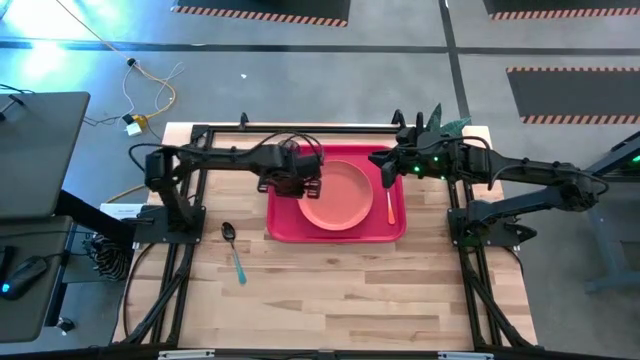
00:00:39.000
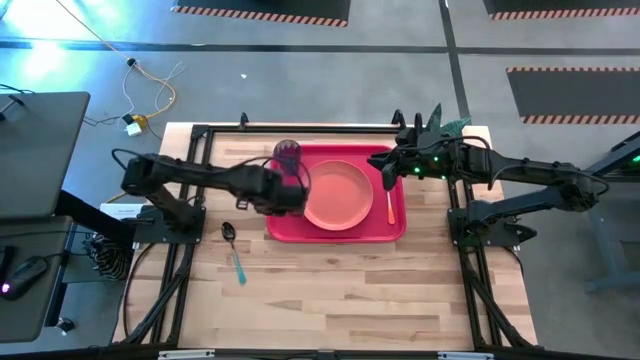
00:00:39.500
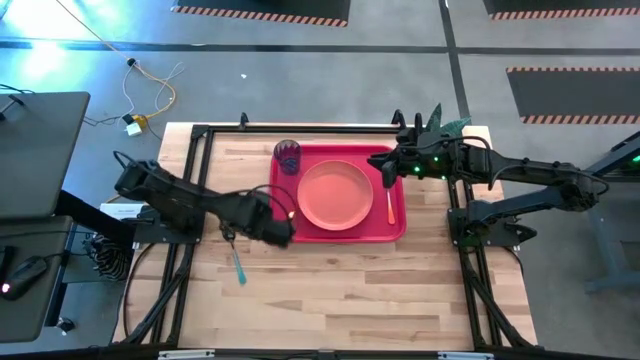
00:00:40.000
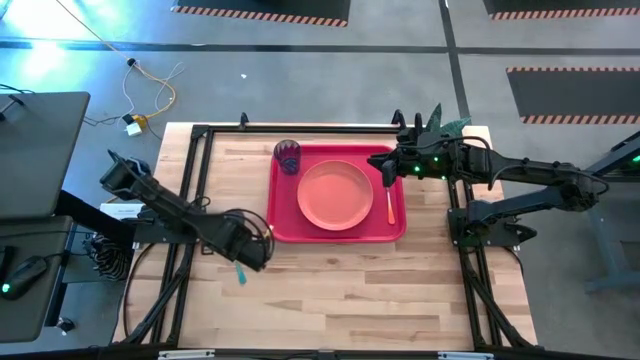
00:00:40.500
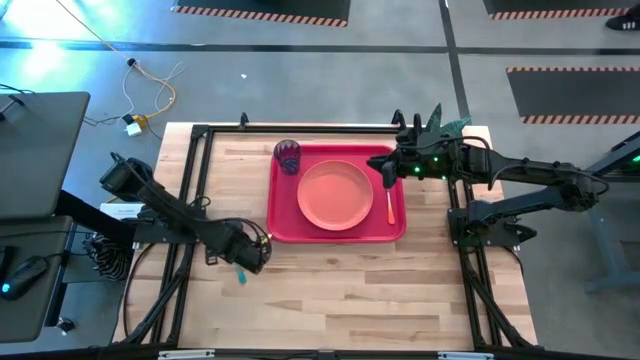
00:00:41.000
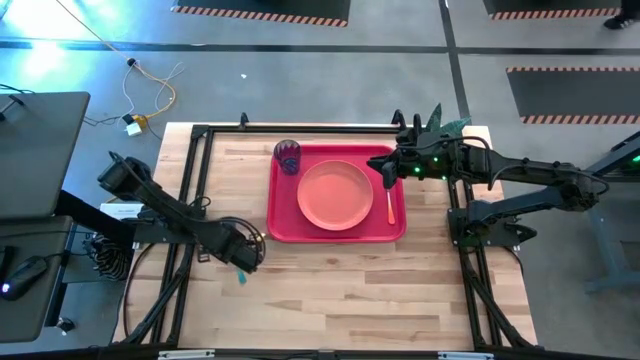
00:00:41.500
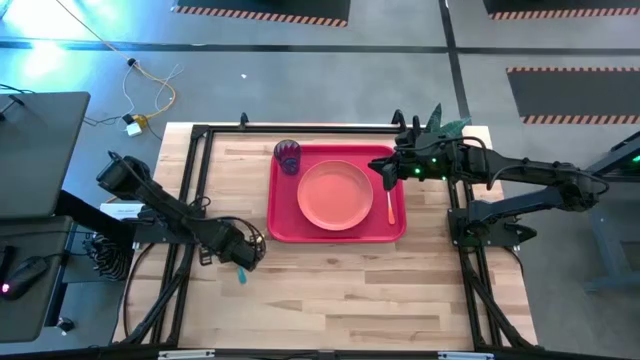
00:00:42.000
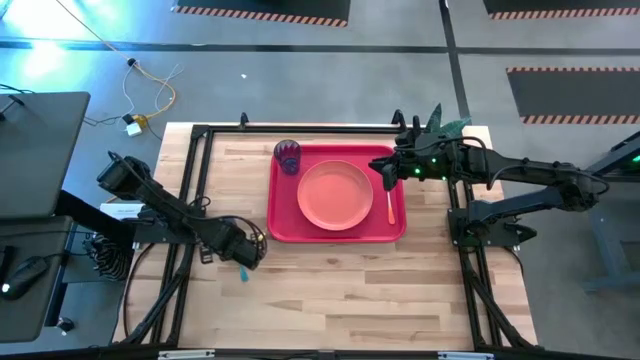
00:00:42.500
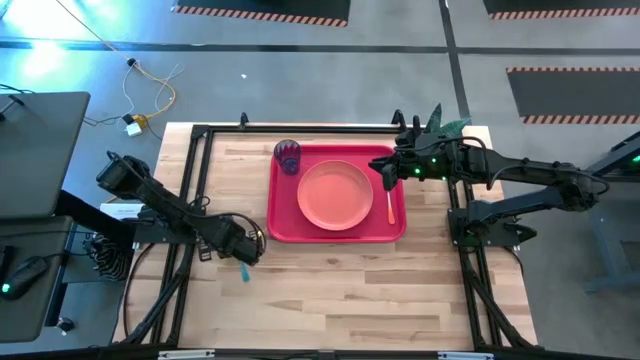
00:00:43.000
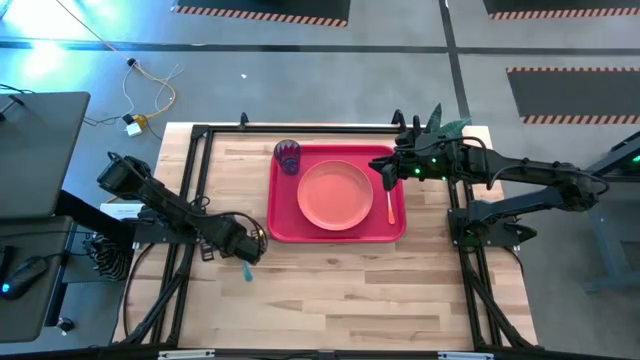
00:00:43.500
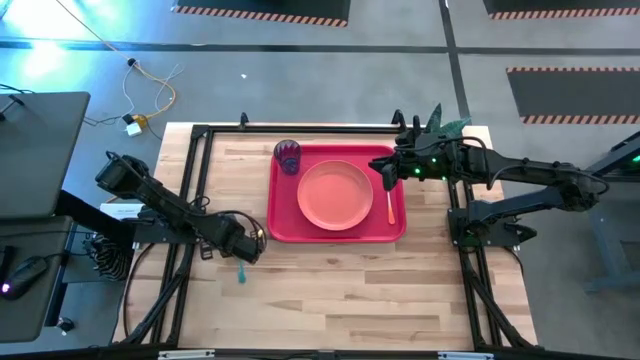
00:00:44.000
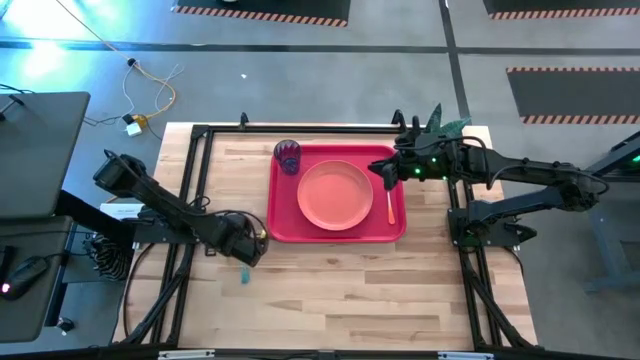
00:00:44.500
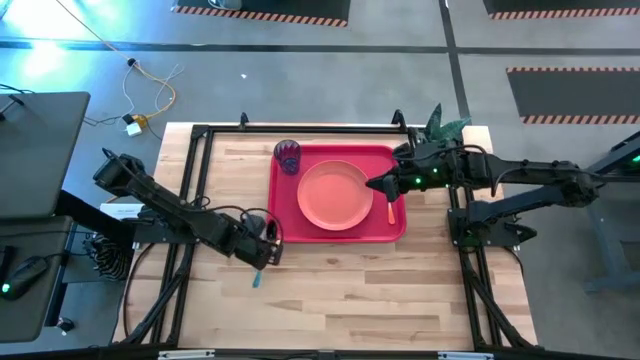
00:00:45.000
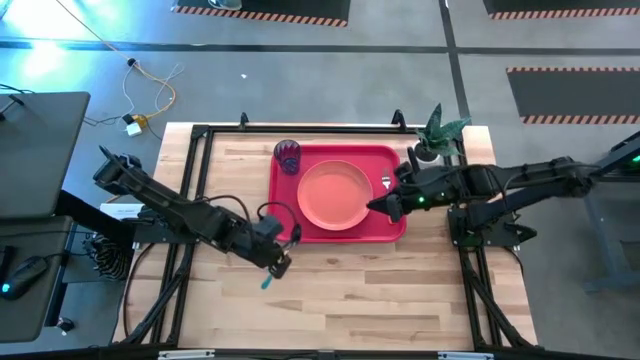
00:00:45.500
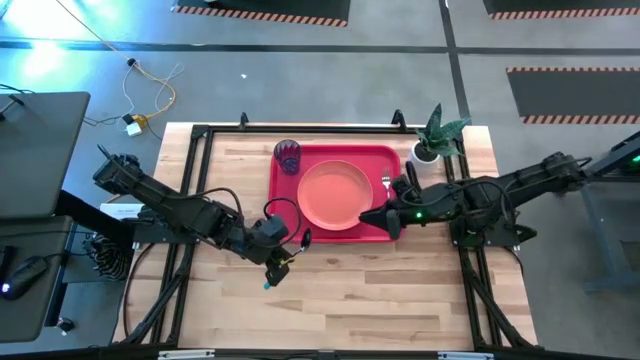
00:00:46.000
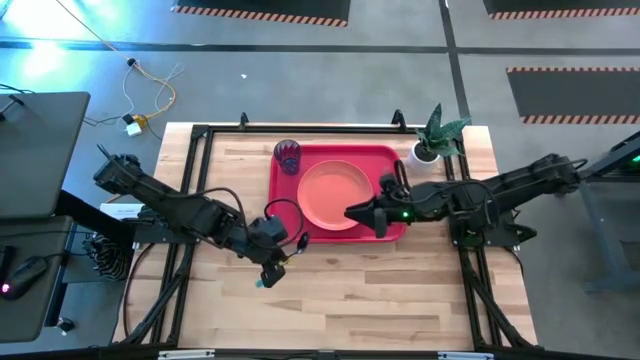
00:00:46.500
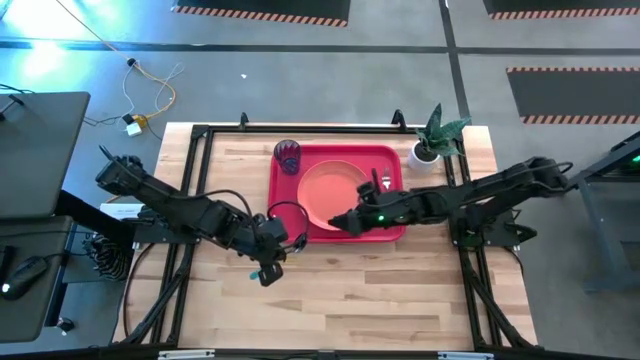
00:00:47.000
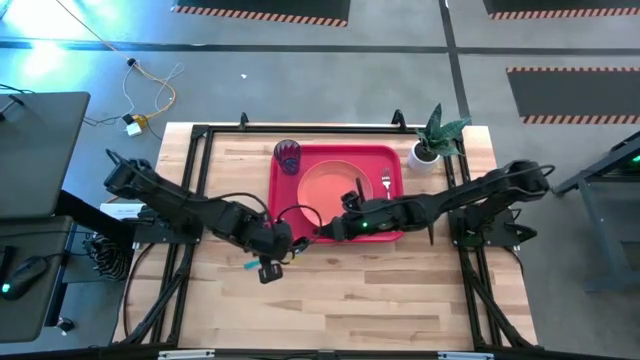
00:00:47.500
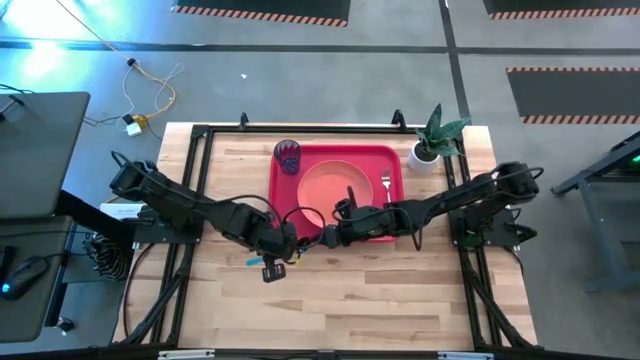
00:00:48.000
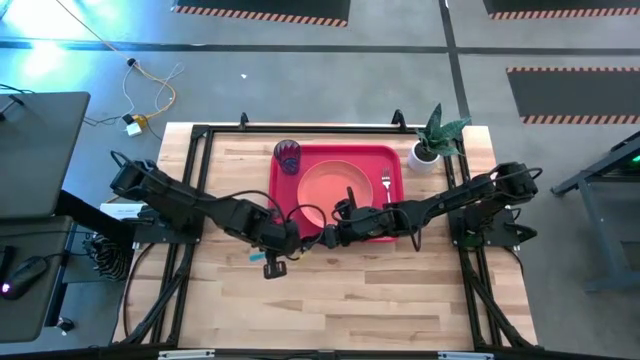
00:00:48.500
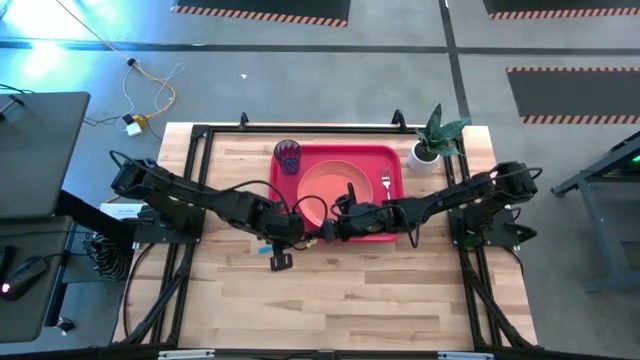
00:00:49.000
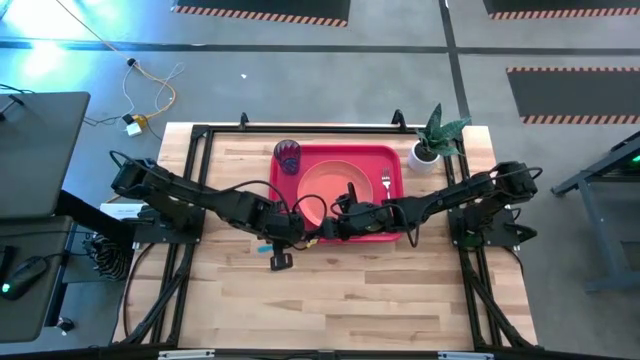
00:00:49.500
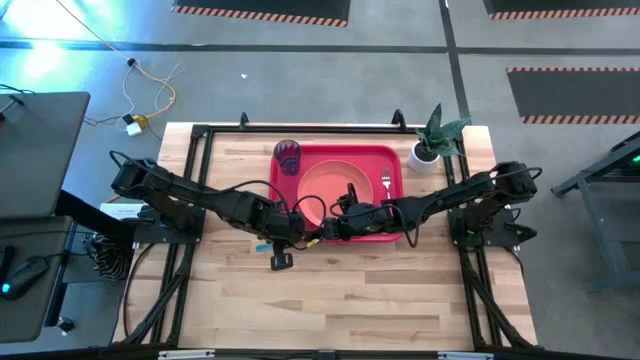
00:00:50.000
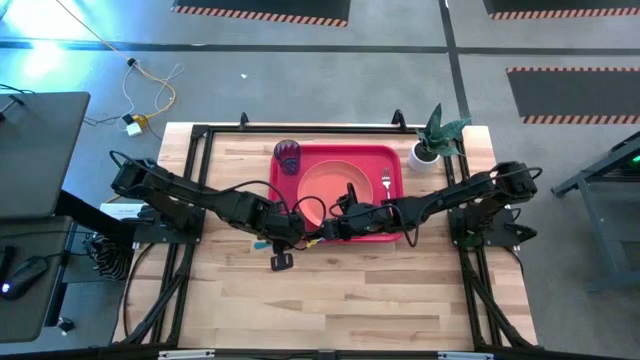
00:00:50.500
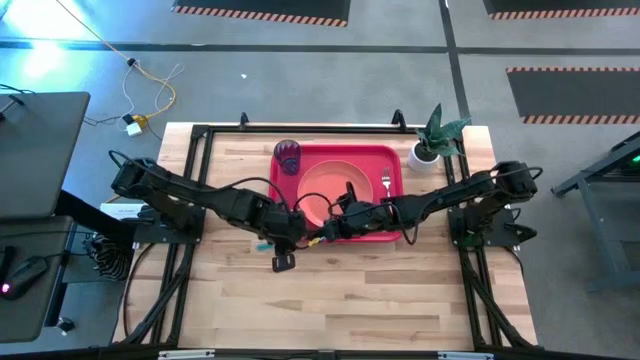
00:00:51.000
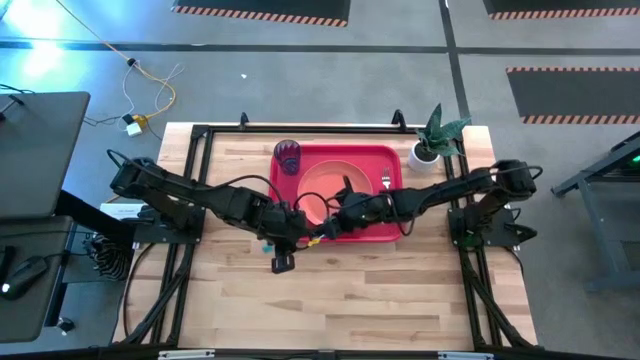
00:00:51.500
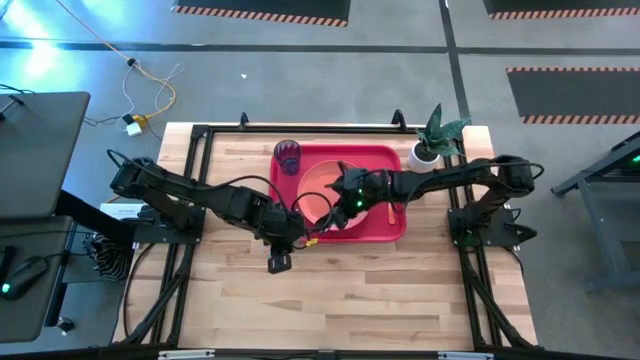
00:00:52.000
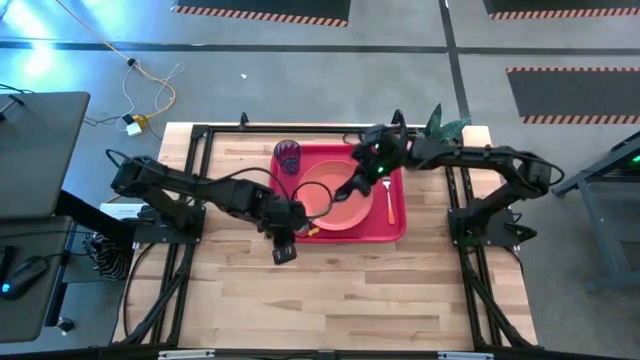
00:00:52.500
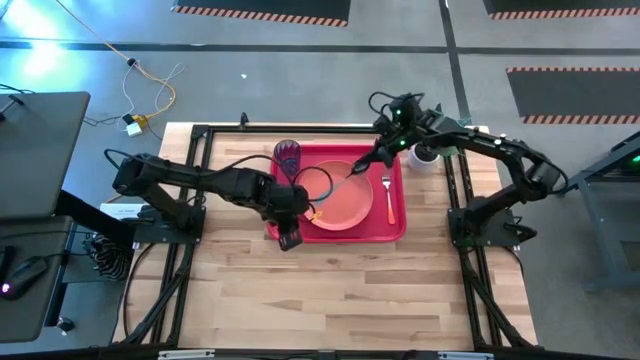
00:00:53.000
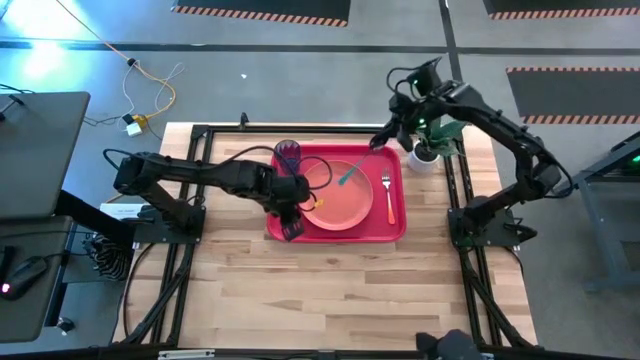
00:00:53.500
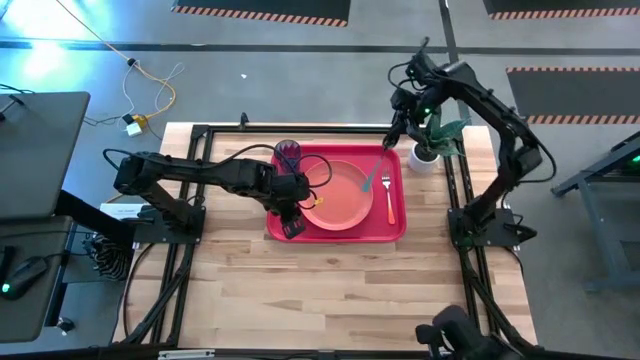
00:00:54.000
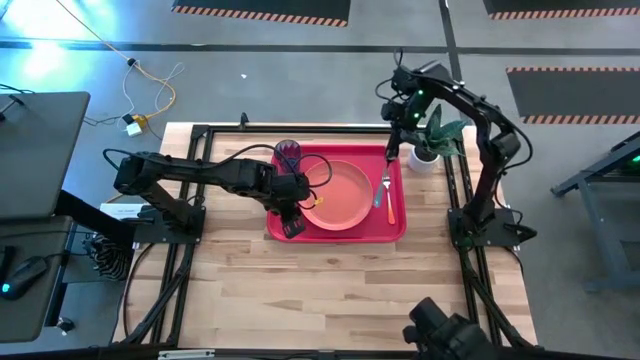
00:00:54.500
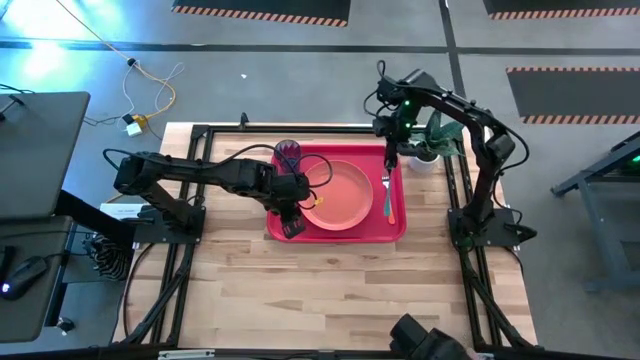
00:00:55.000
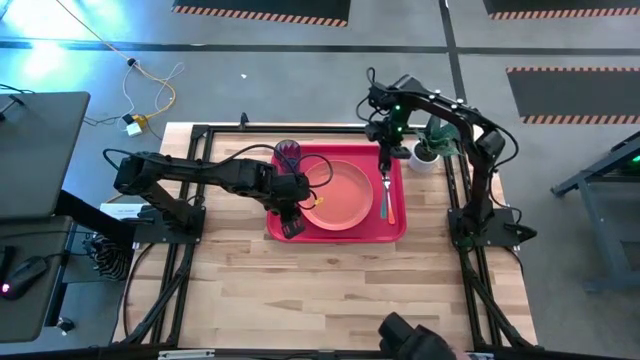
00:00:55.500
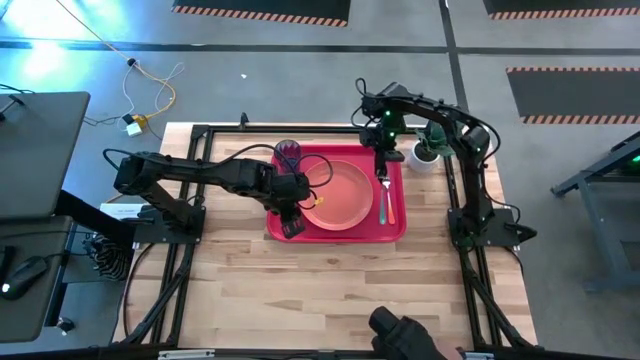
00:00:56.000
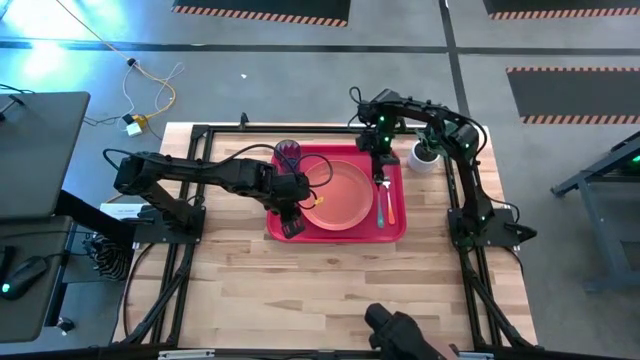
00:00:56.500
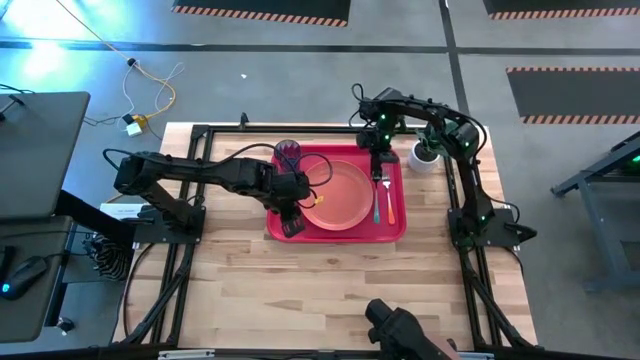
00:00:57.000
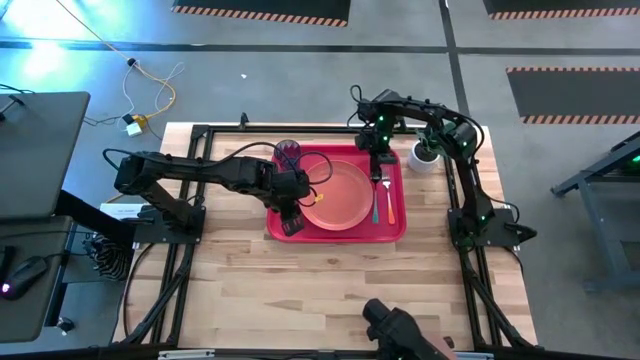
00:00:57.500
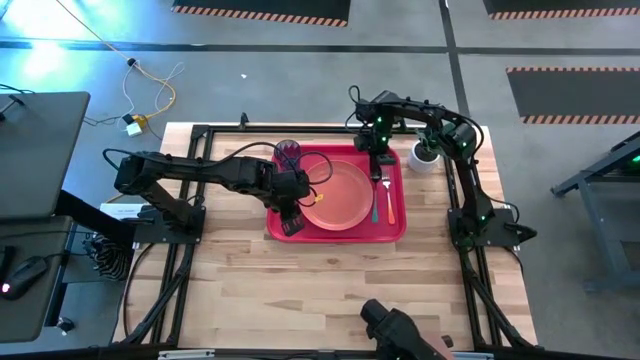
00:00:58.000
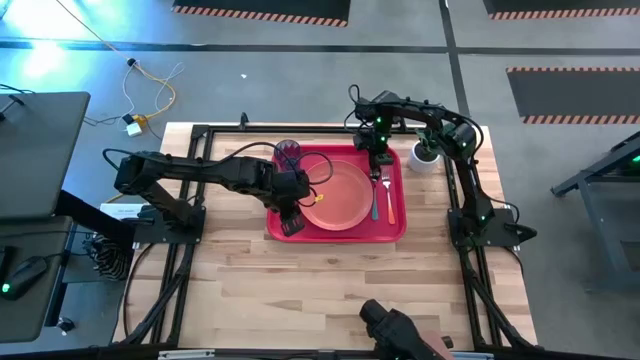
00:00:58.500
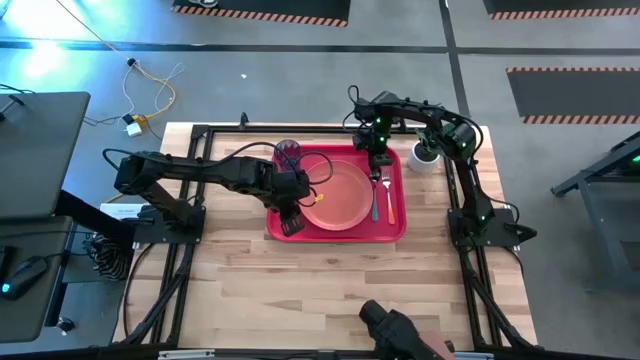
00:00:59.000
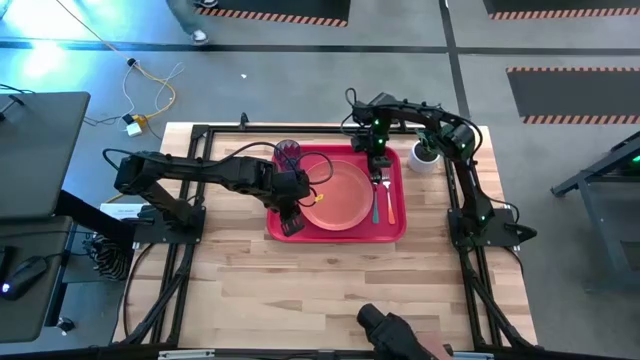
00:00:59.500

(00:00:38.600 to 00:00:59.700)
Task: Pick and place plate/cup/fork/spoon on tray
Put the blue spoon on the red serving tray in between of the orange plate and orange fork
